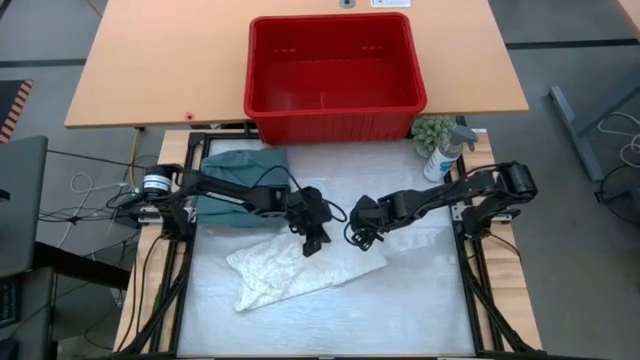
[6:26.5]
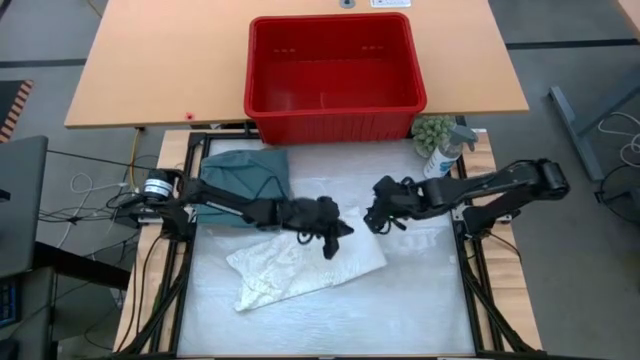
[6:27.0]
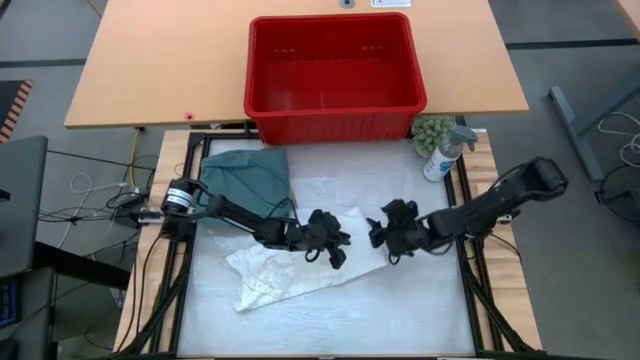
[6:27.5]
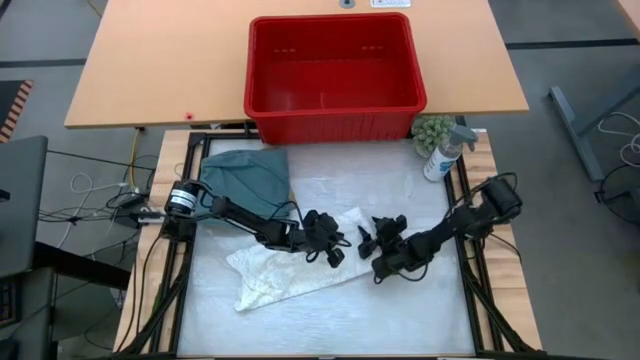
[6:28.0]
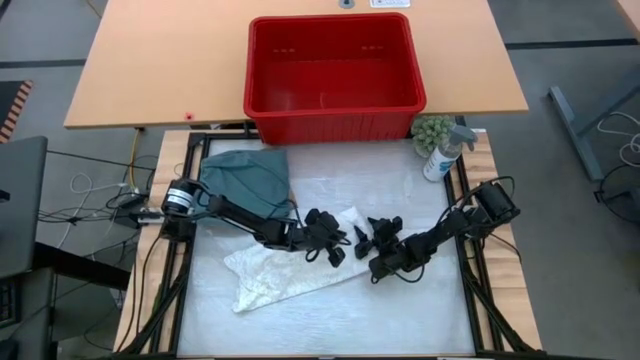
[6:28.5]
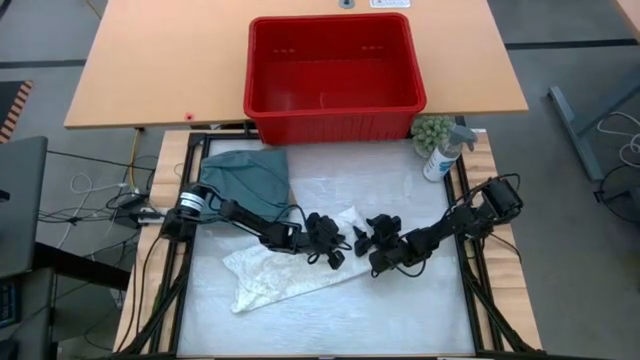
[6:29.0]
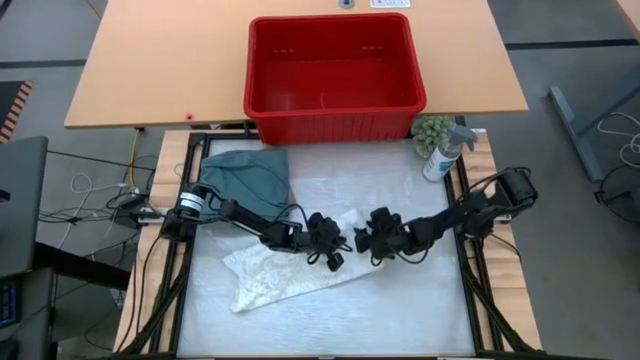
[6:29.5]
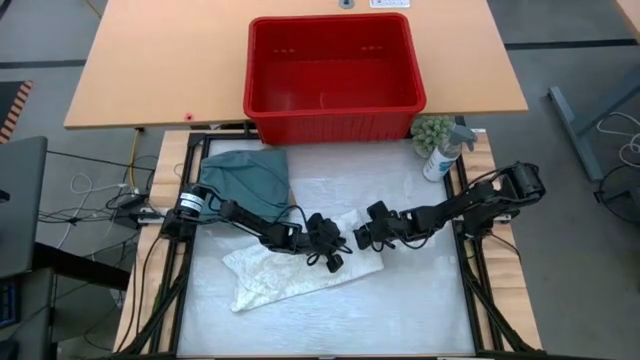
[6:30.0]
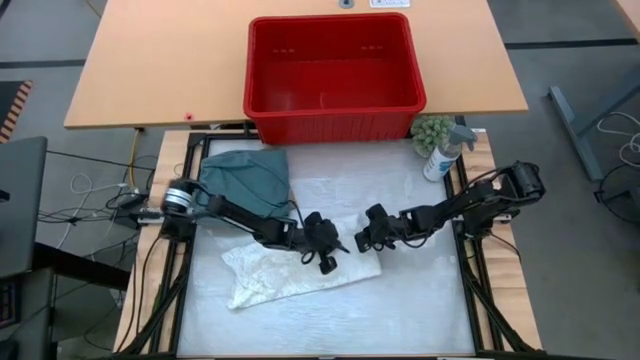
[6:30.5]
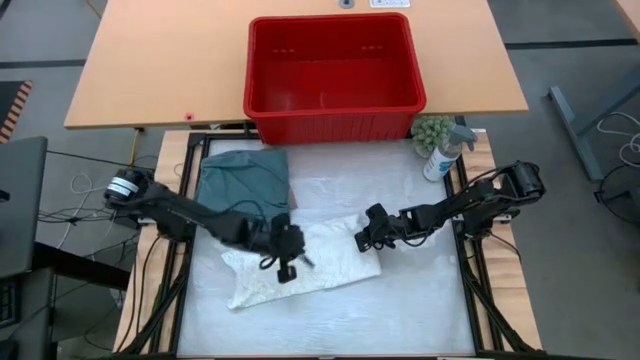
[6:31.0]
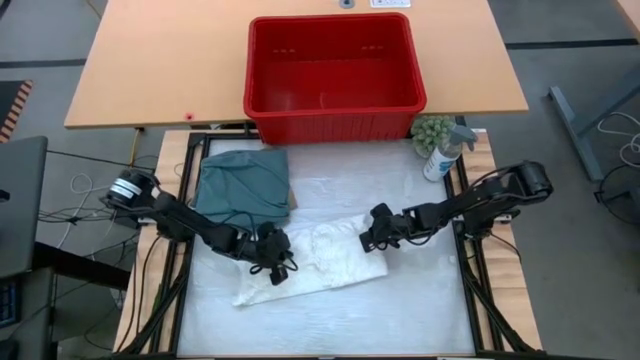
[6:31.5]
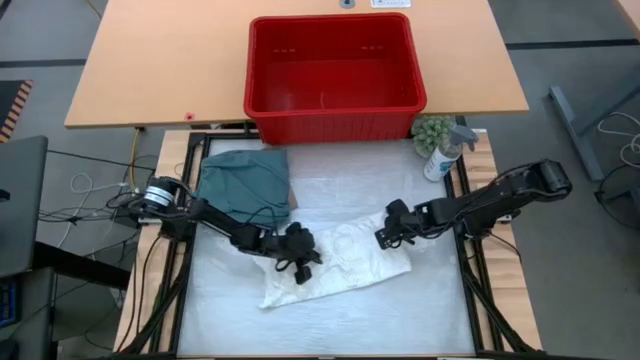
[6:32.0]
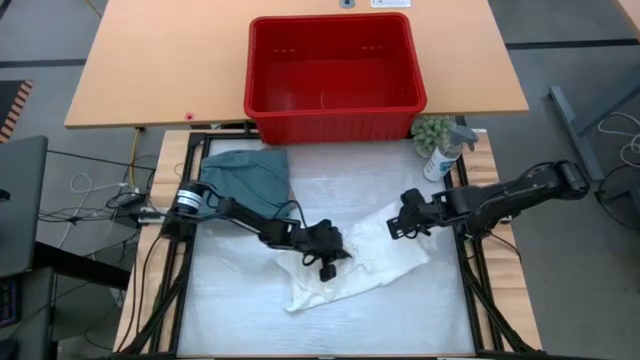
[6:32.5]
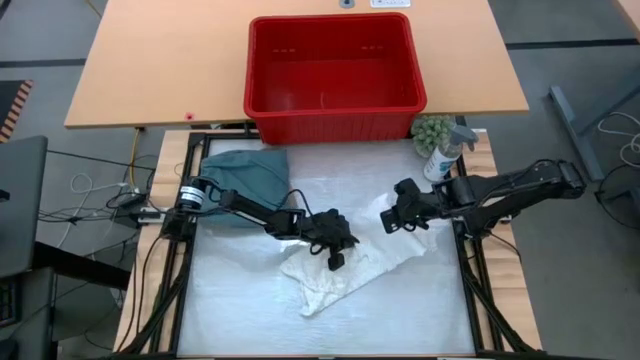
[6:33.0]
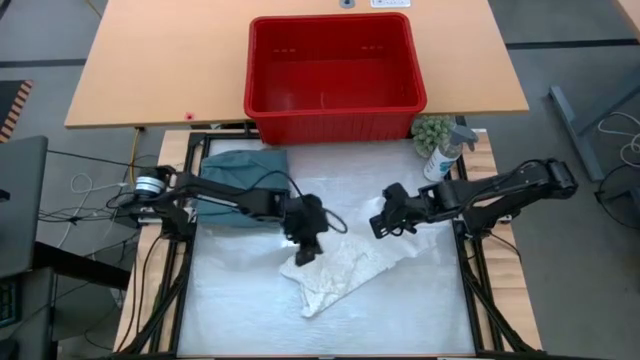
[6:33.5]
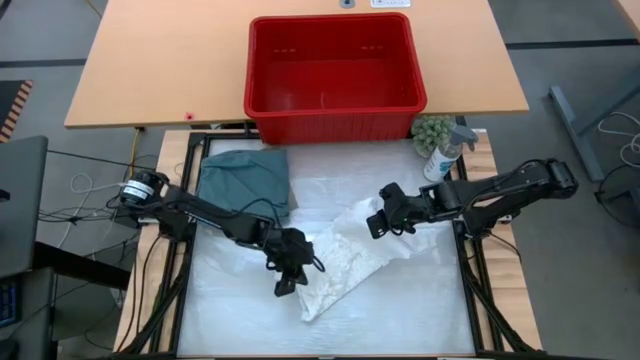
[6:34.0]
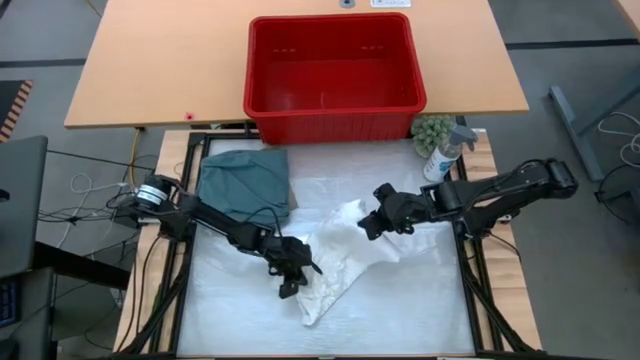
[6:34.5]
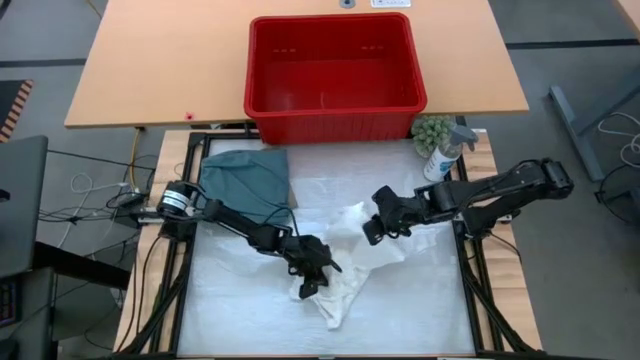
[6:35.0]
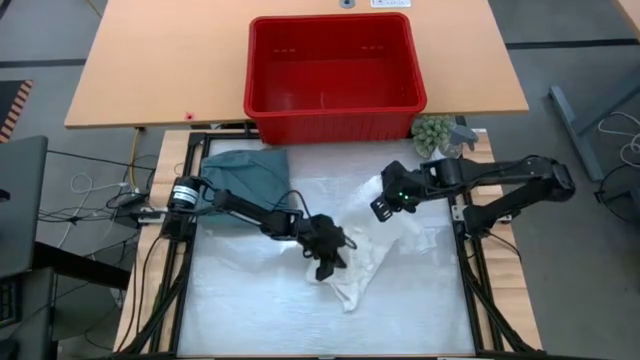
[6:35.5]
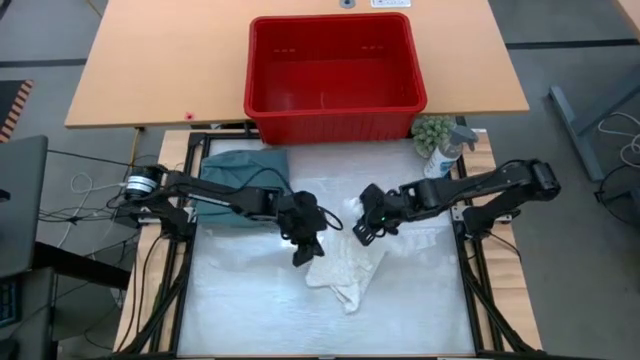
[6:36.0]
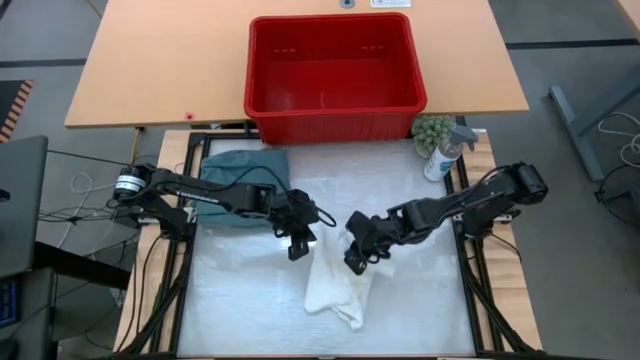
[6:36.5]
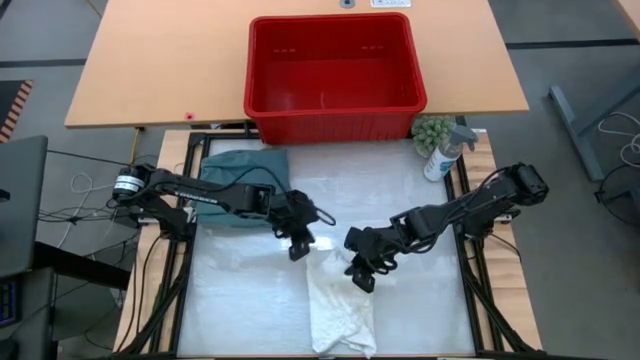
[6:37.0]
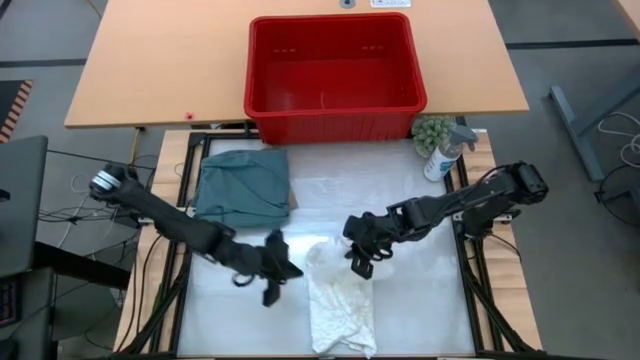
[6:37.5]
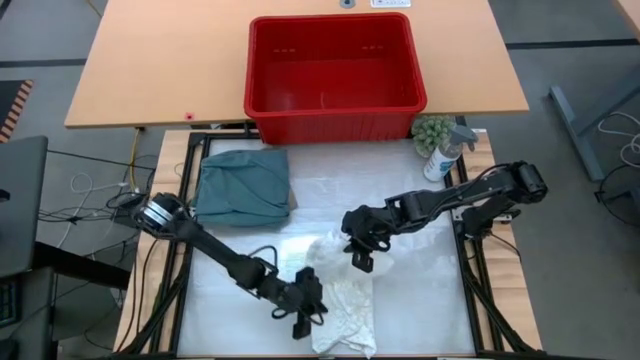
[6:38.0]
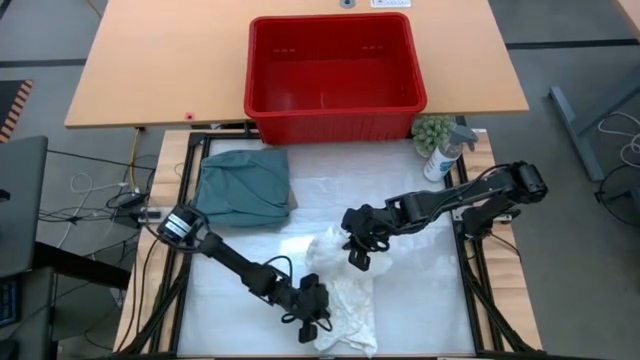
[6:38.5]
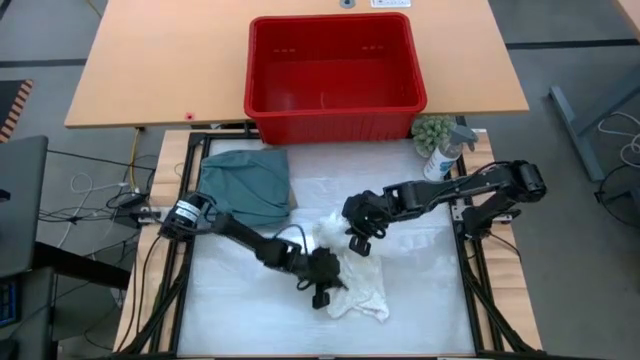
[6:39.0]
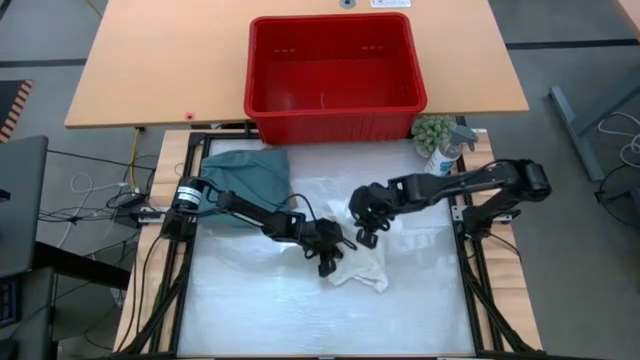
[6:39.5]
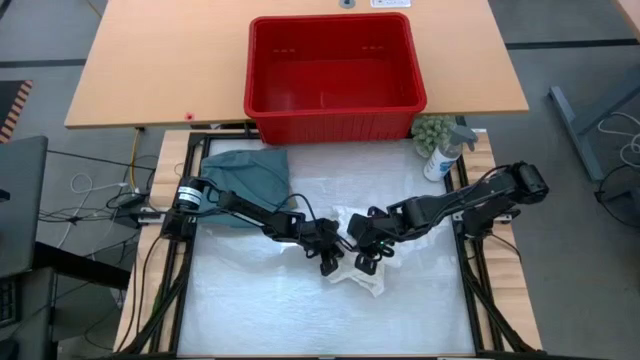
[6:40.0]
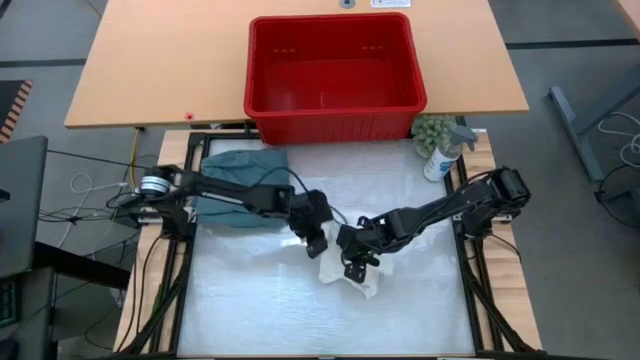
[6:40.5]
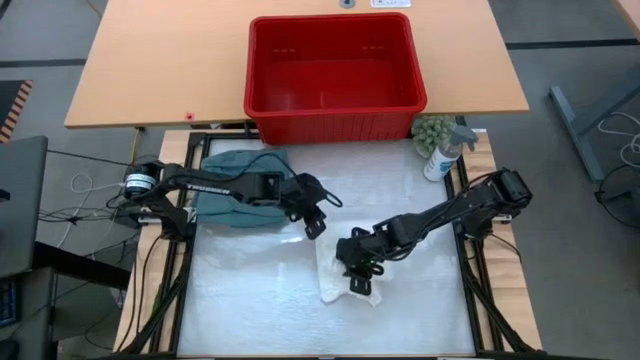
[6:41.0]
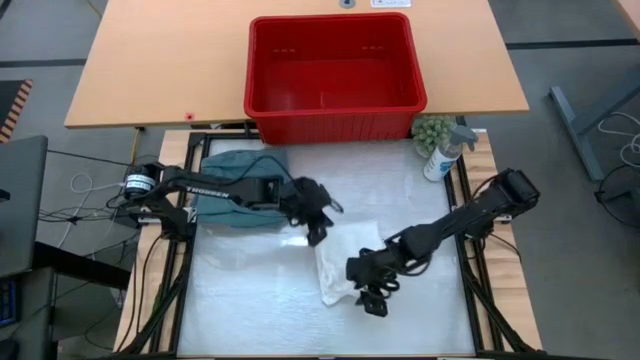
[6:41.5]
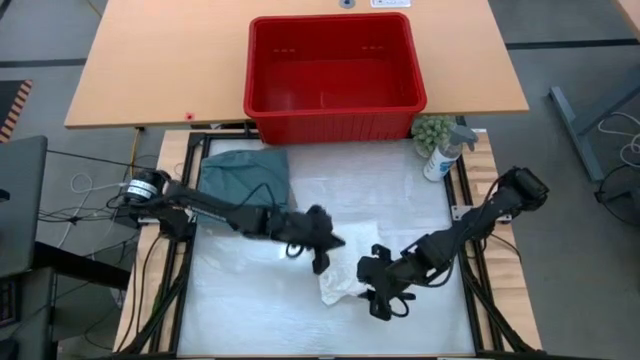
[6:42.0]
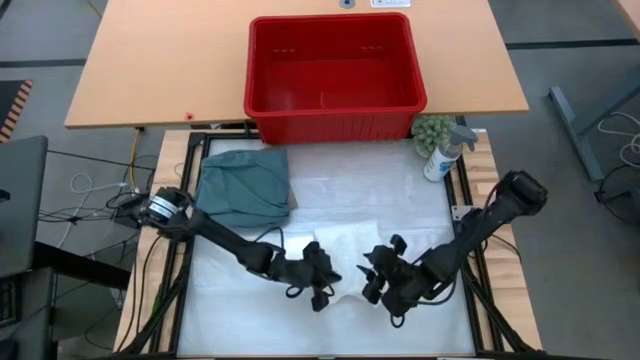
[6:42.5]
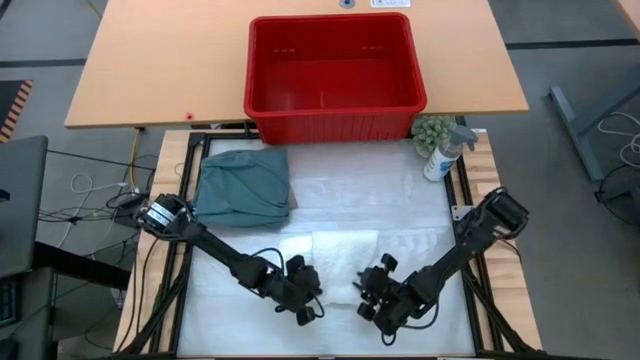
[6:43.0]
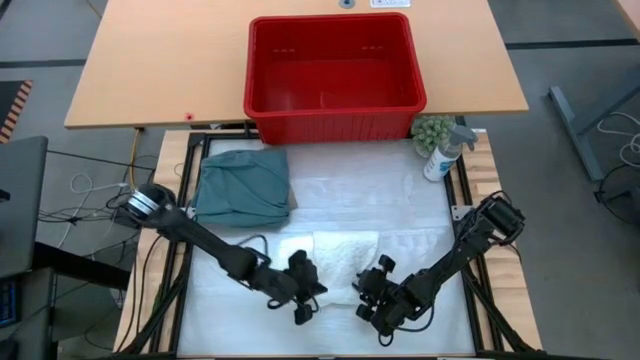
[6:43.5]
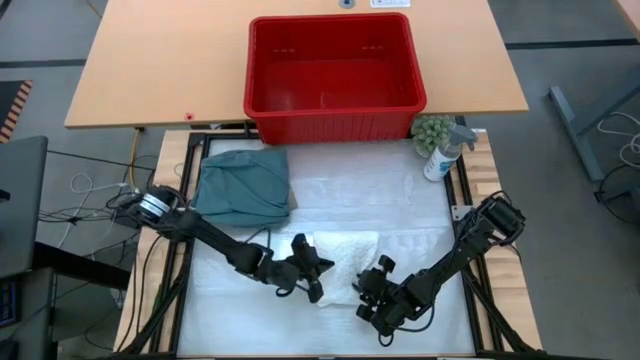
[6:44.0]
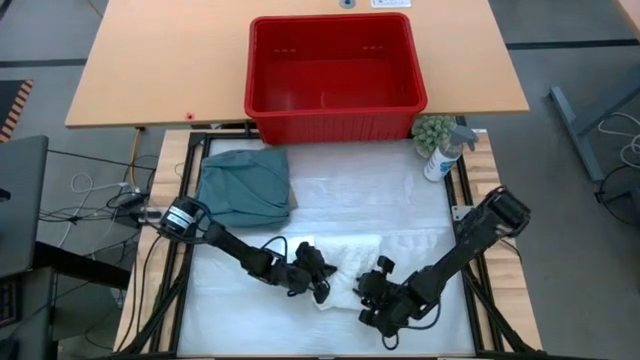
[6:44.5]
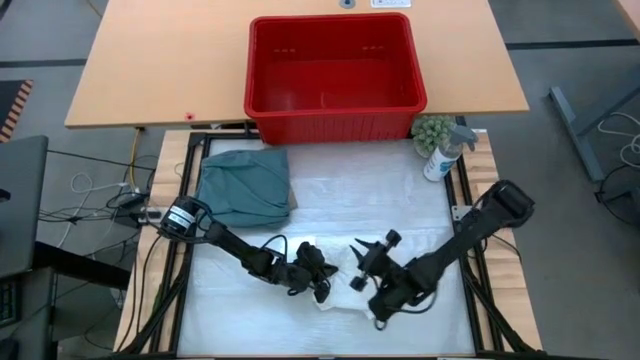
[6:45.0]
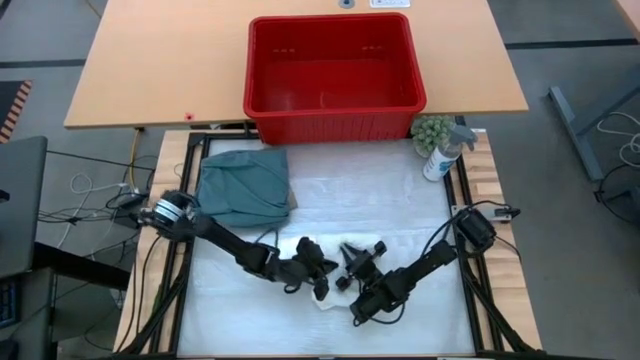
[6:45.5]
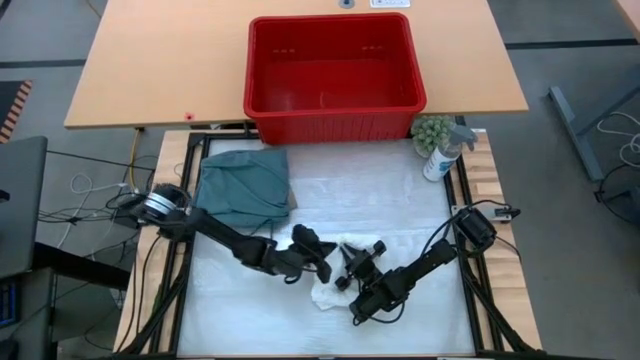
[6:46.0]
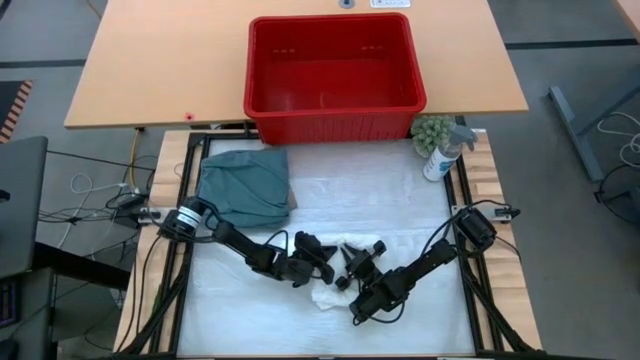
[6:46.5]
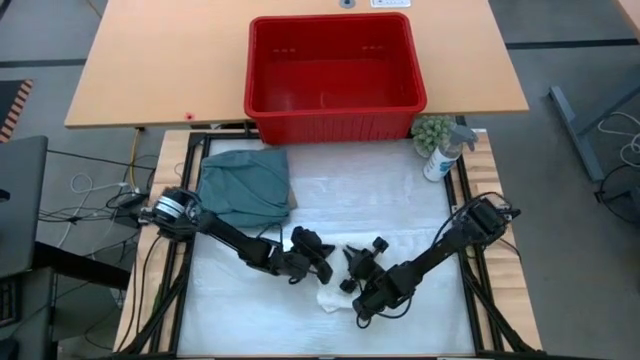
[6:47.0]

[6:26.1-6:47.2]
Task: Fold Laundry from Bin
Fold the white shirt in the red bin
